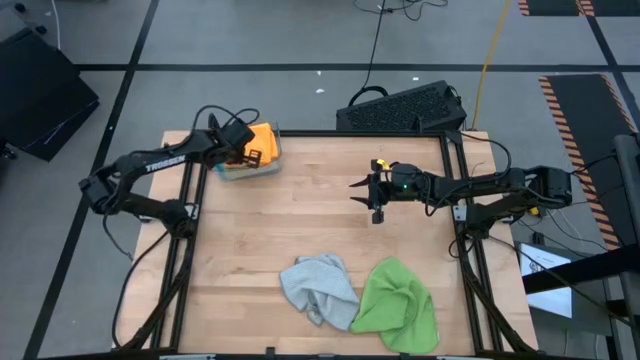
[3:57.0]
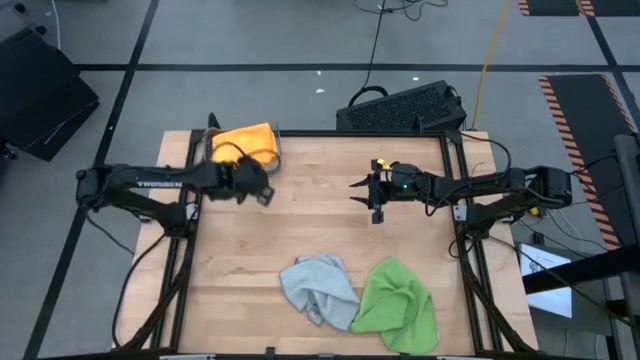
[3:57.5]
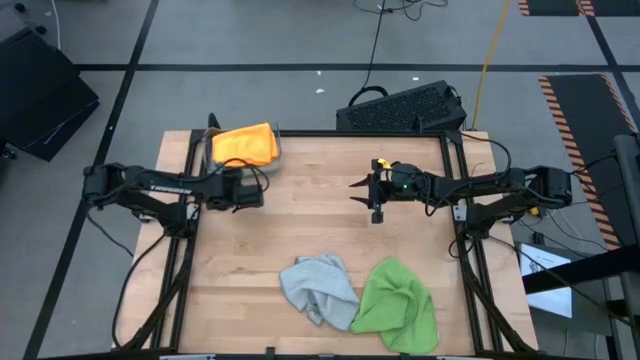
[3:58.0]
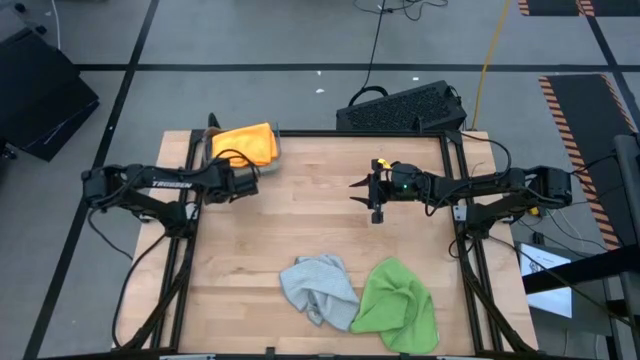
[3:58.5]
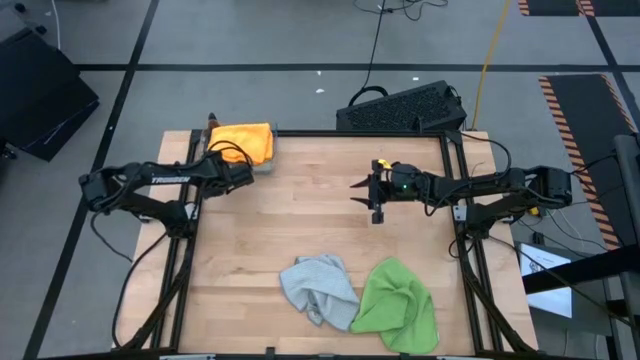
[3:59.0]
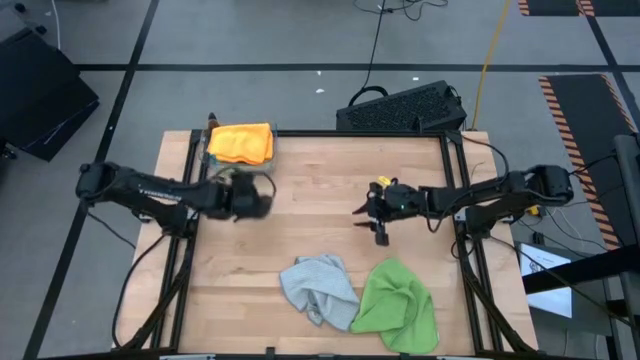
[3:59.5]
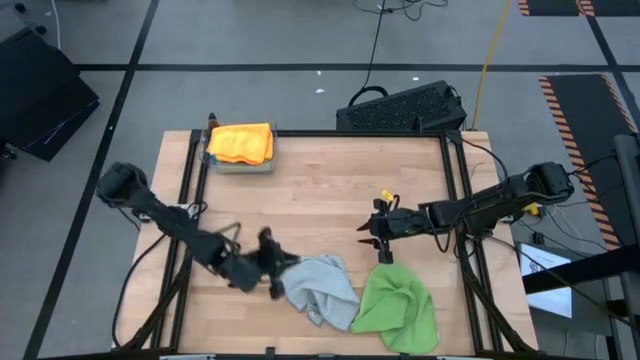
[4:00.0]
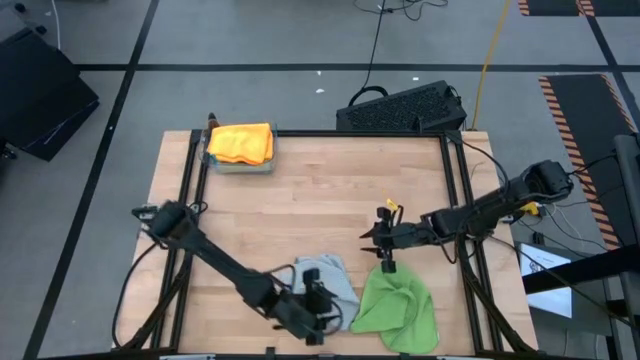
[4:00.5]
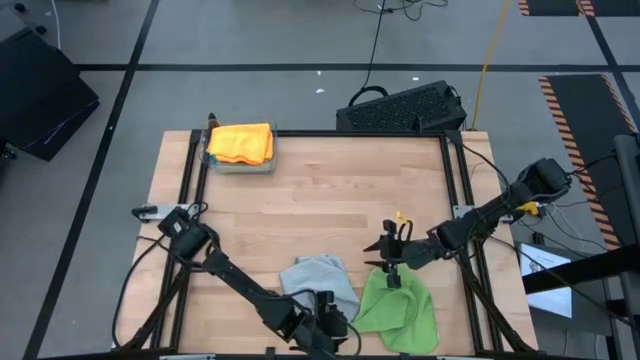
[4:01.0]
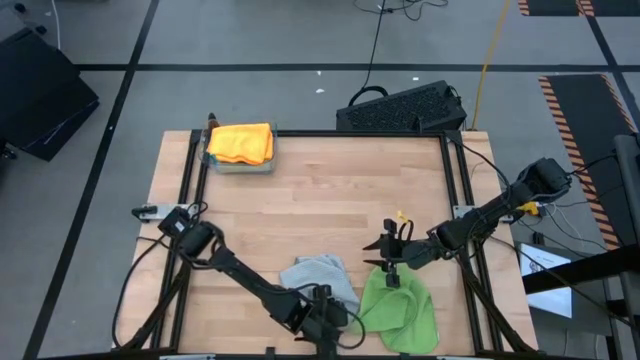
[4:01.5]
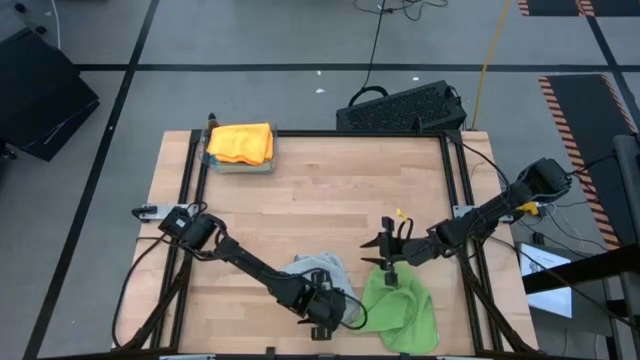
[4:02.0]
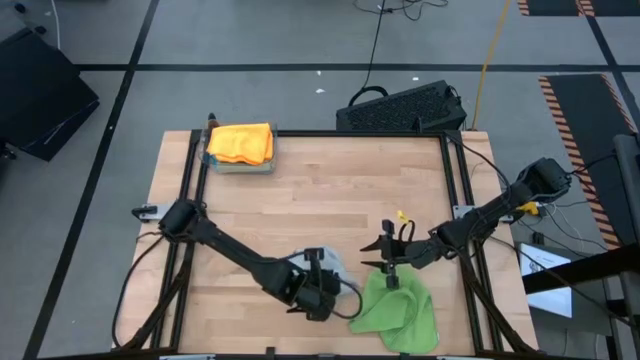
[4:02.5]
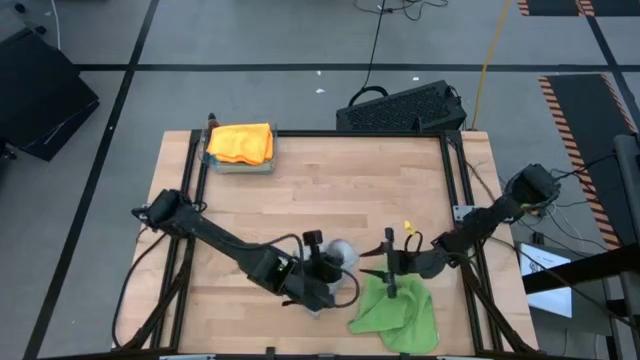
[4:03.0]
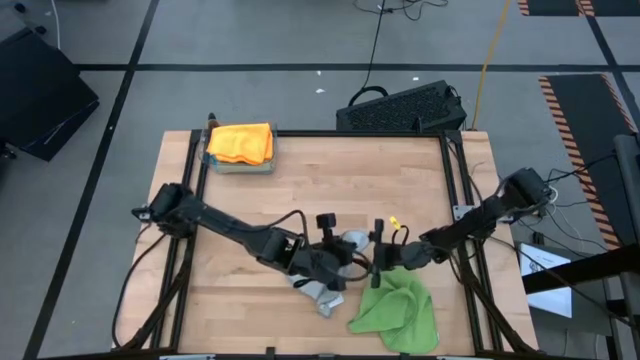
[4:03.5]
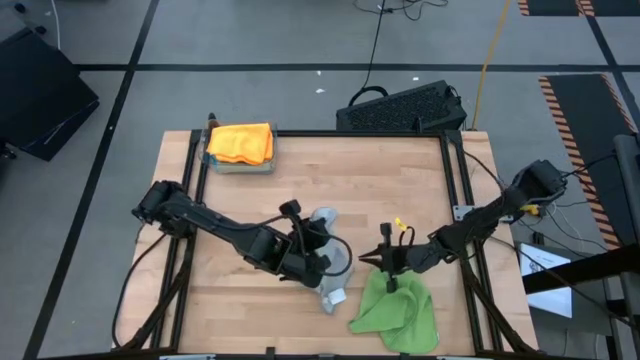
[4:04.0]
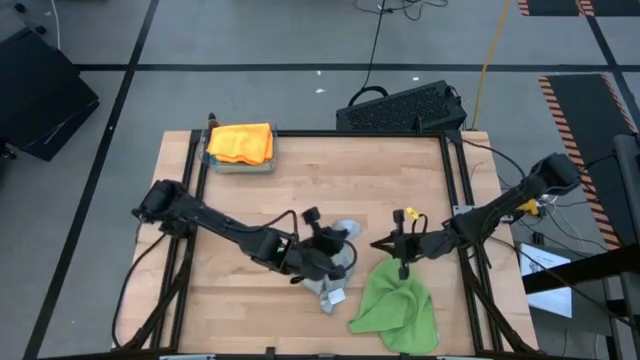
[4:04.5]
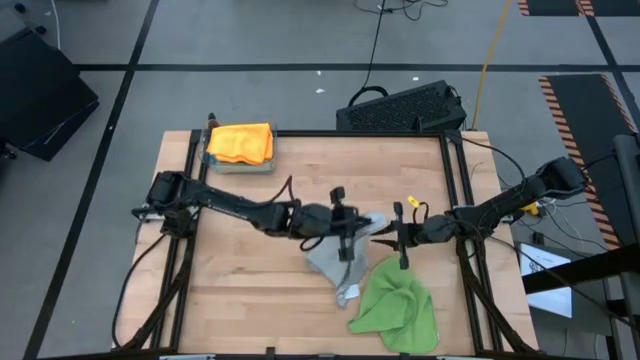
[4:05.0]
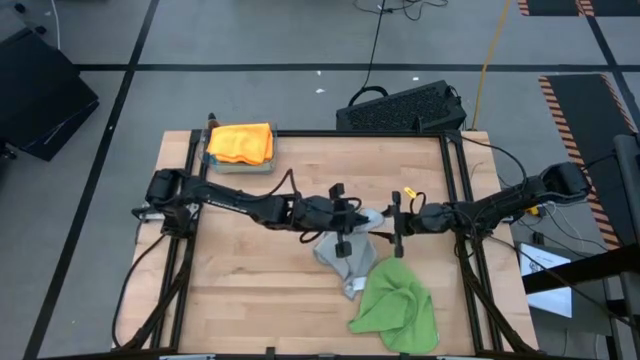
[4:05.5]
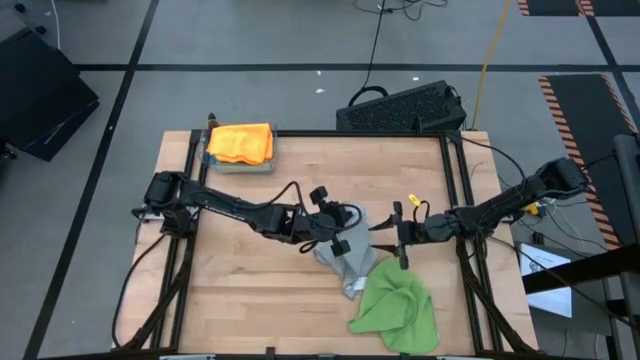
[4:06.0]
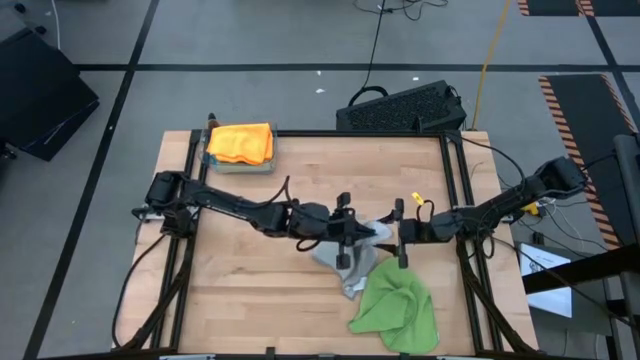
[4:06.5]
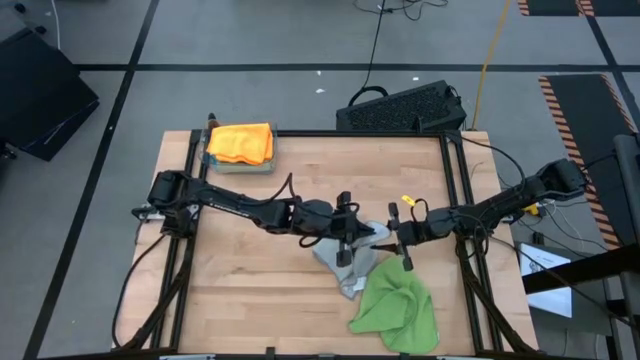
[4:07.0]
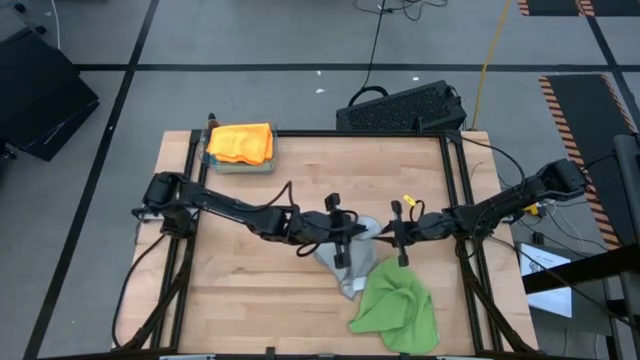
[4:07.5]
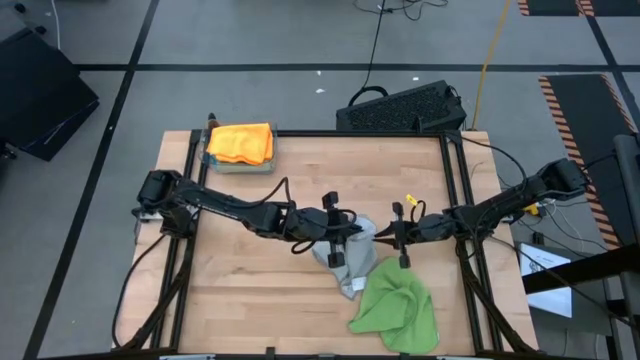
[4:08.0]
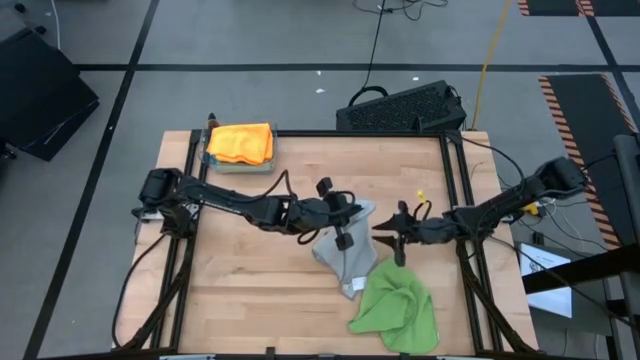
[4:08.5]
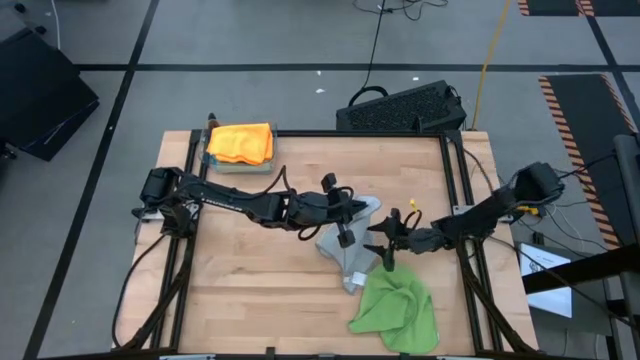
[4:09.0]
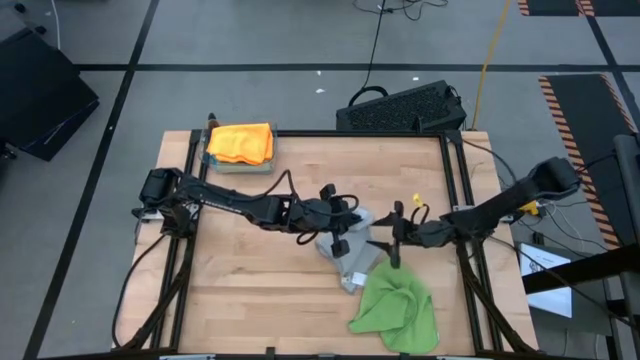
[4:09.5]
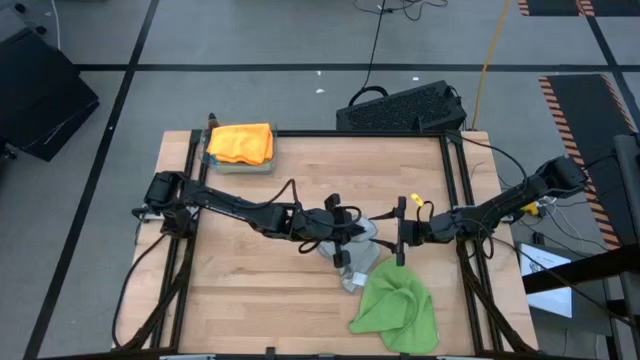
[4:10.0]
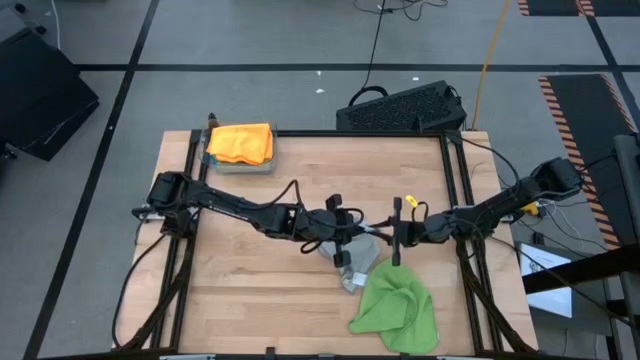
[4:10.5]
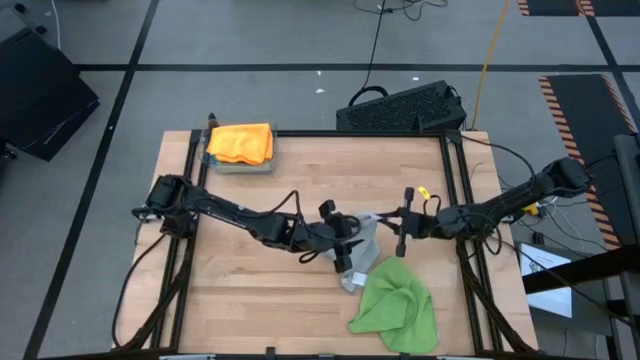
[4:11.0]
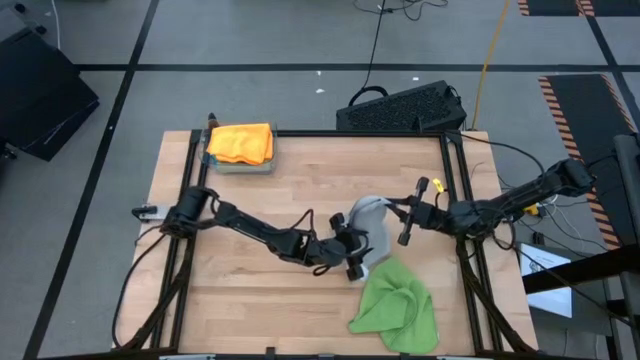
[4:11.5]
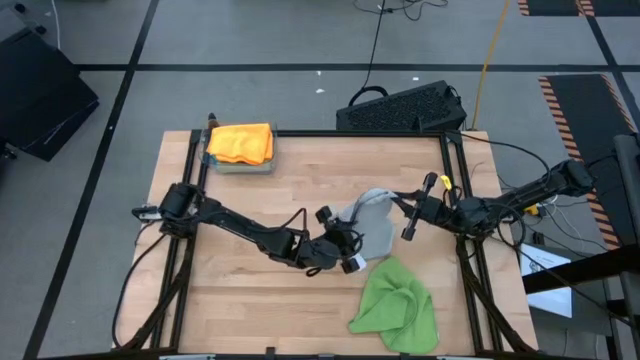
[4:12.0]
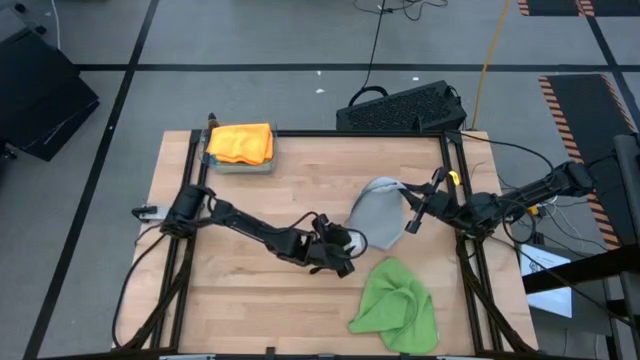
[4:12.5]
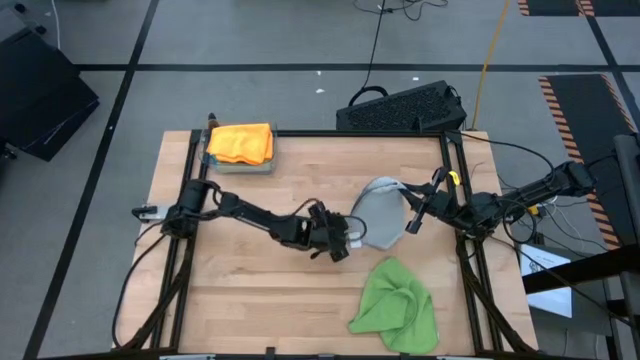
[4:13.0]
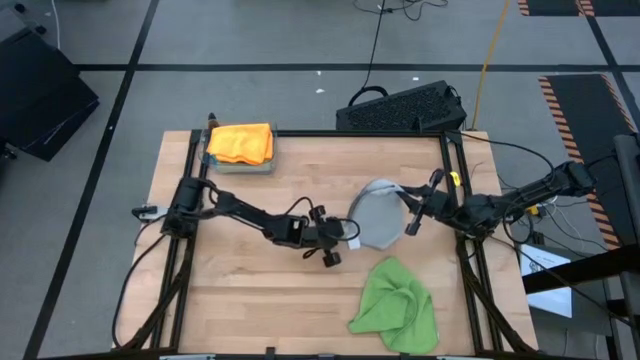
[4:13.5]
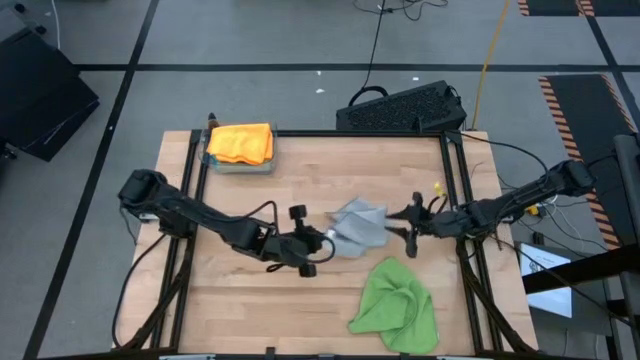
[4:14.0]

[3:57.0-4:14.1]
Task: Fold microfiber towels
Fold the gray microfiber cloth

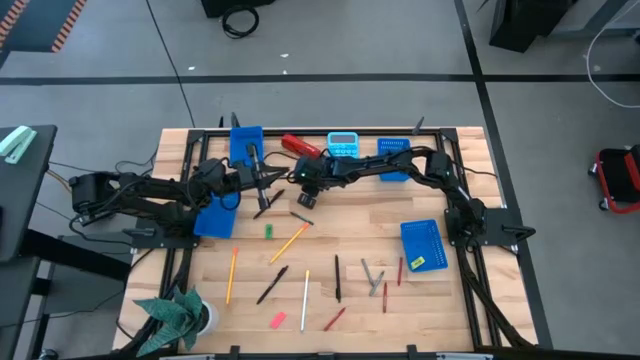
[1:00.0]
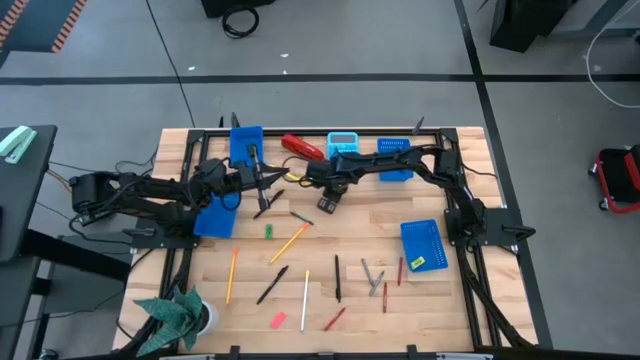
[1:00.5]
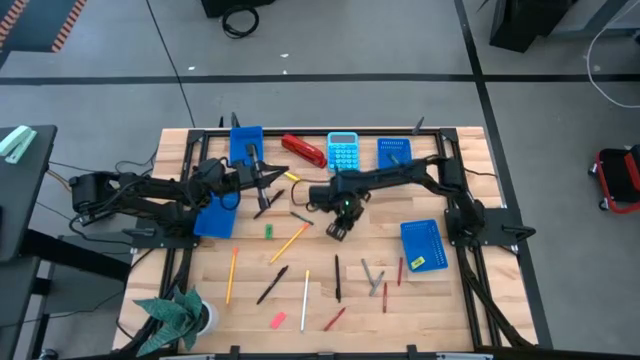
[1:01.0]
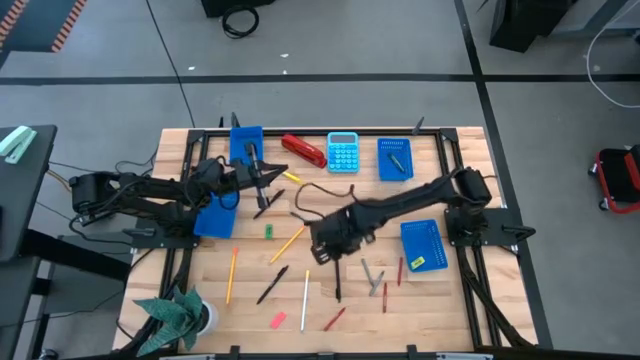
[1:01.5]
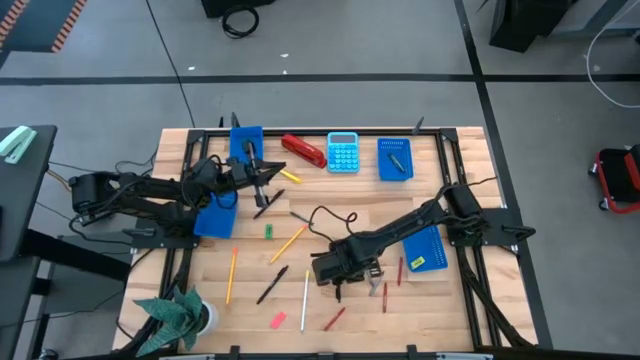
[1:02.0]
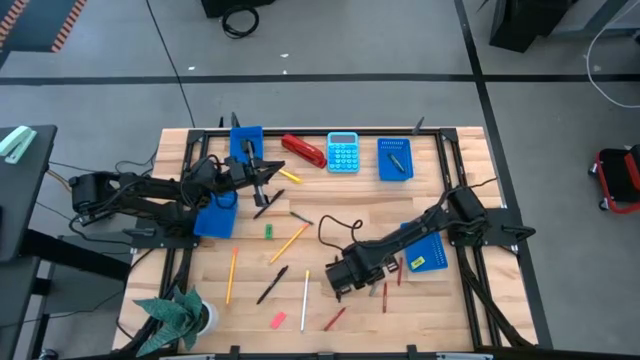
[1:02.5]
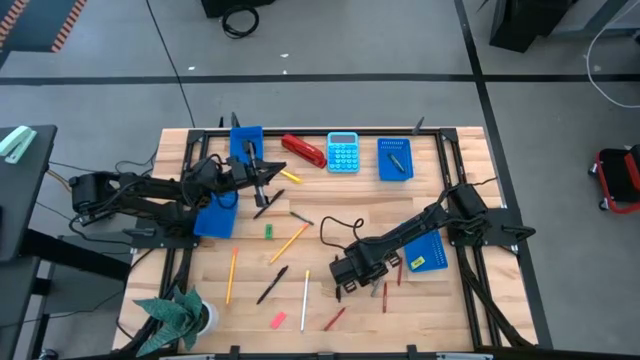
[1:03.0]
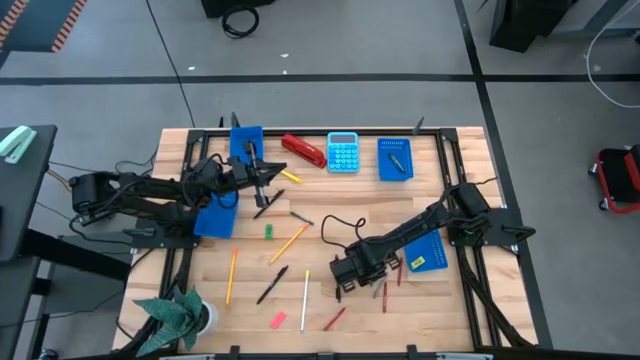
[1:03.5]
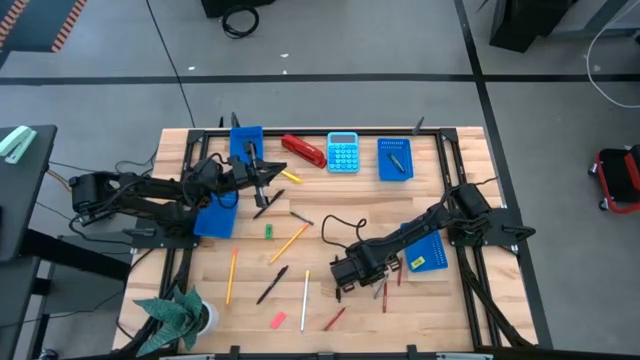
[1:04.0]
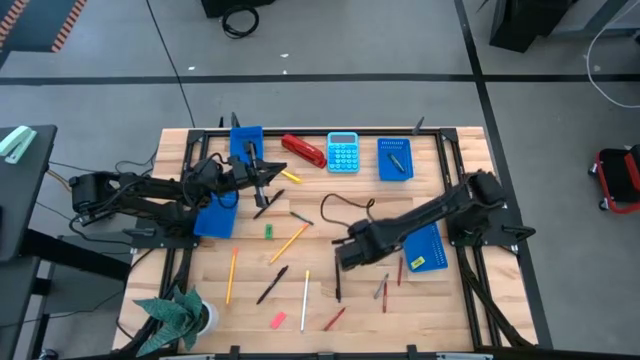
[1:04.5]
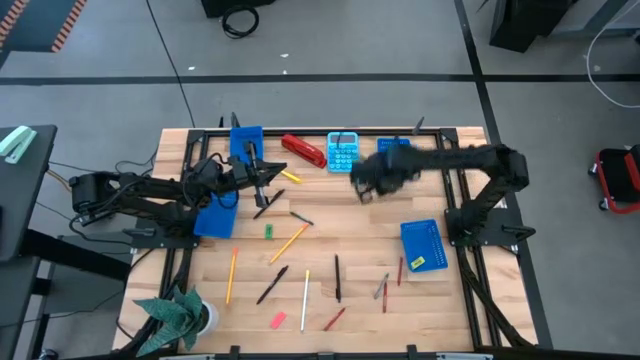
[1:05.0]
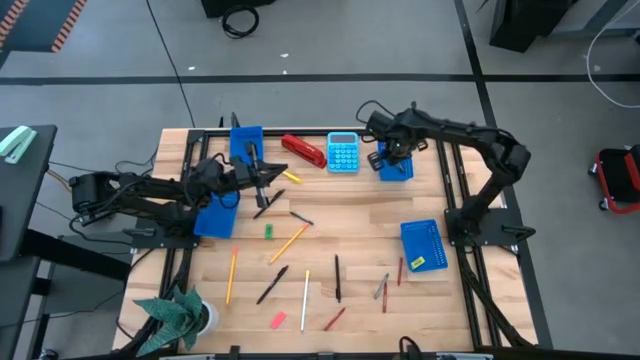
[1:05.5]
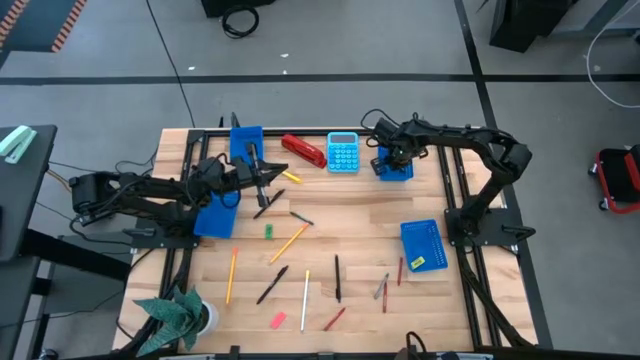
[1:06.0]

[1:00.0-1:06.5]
Task: Sort crayons/erasers/pens/pencils in bins
Put the top gray crayon into the top right bin
